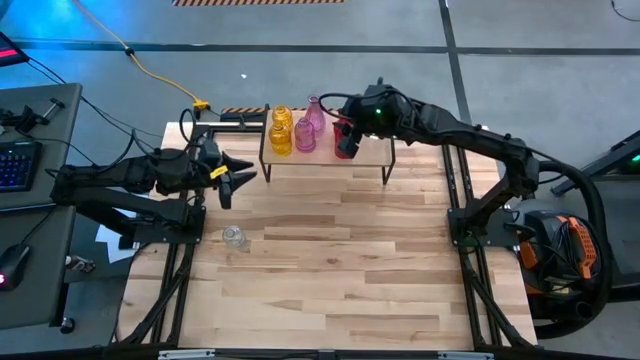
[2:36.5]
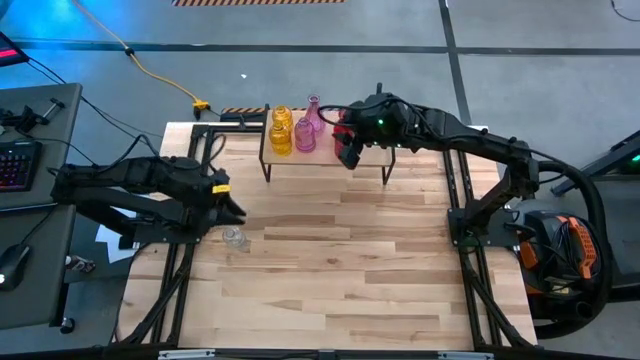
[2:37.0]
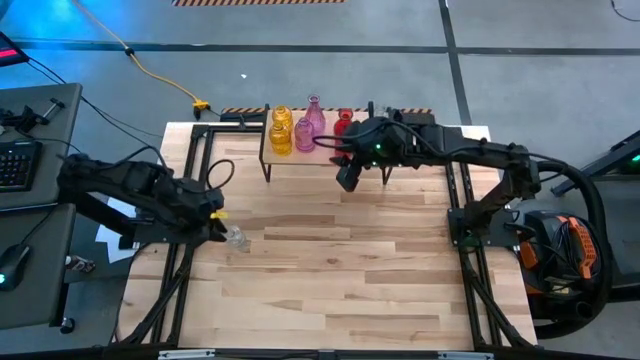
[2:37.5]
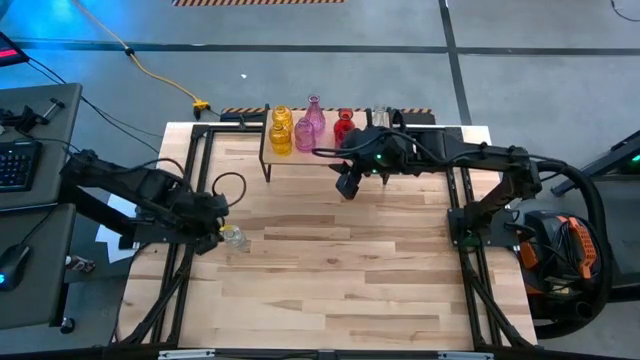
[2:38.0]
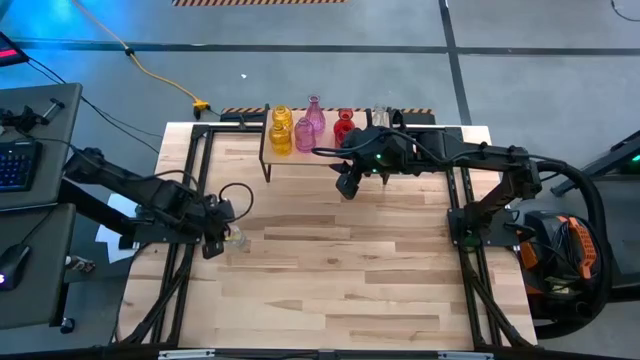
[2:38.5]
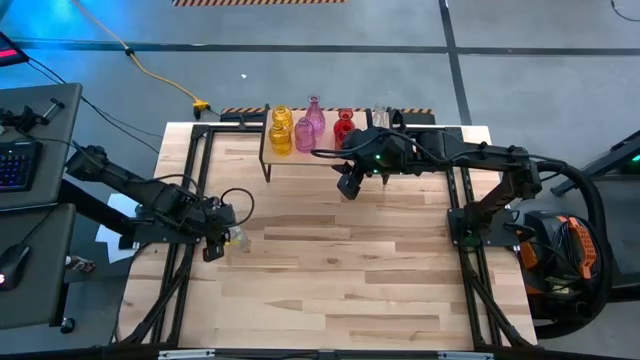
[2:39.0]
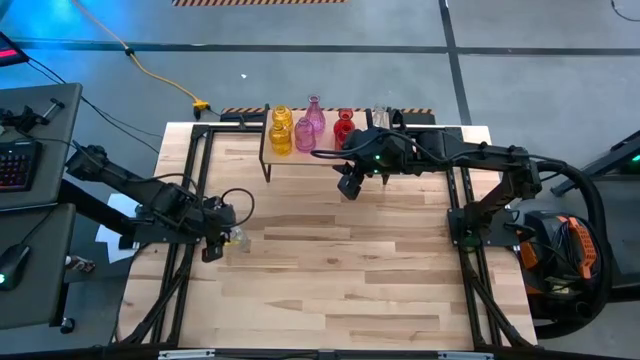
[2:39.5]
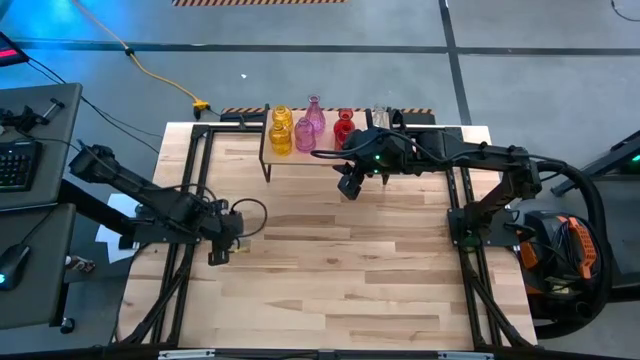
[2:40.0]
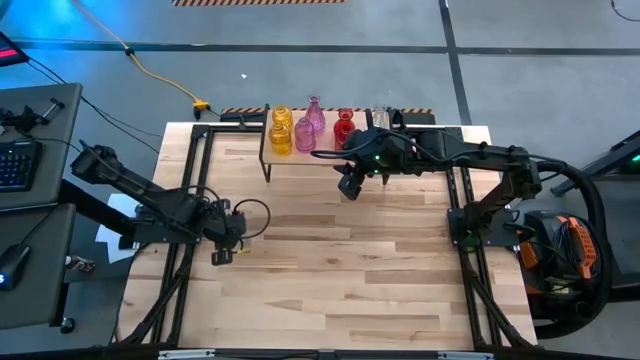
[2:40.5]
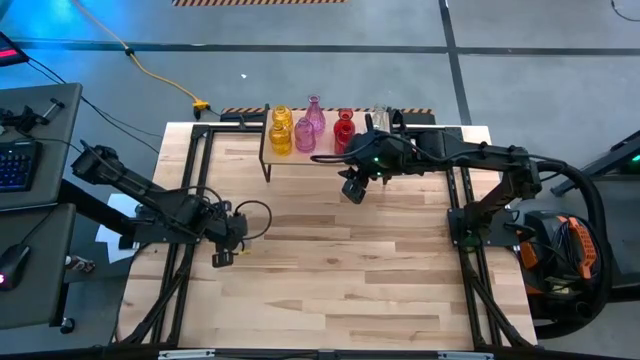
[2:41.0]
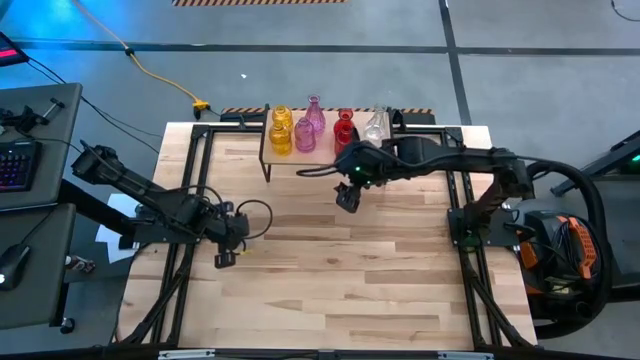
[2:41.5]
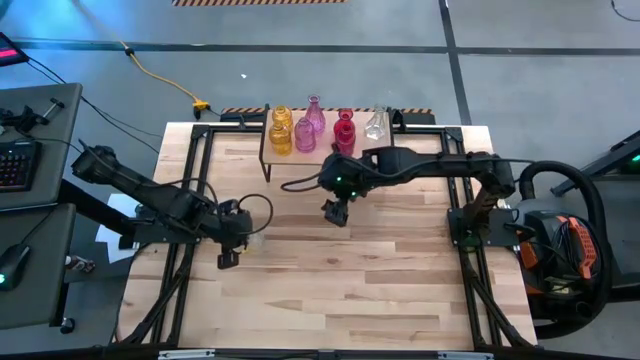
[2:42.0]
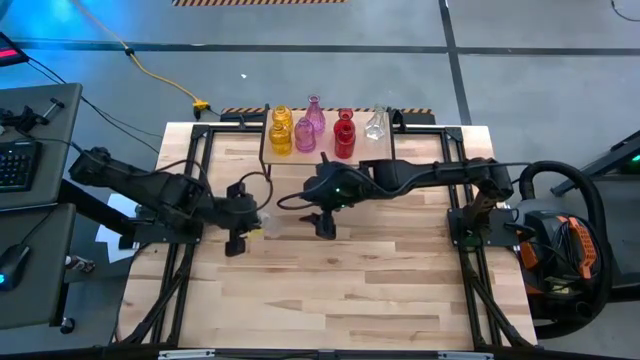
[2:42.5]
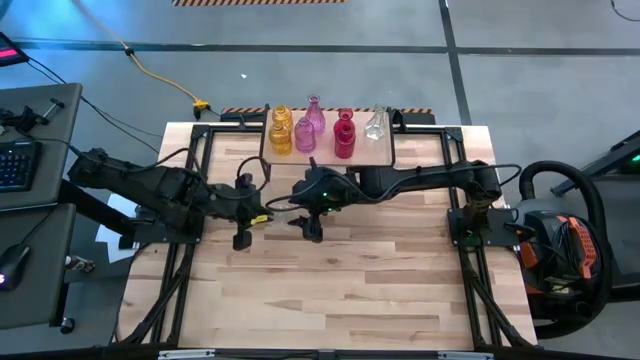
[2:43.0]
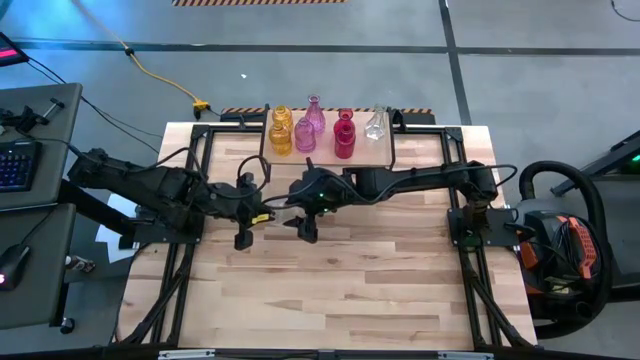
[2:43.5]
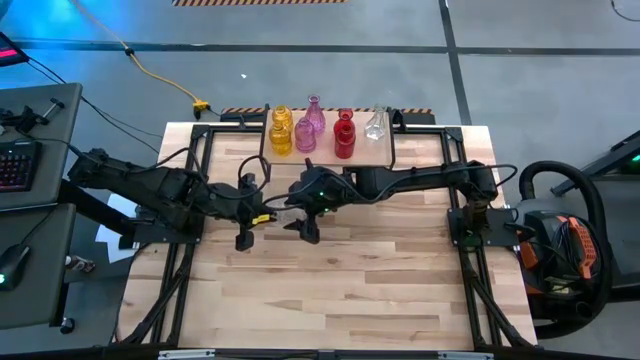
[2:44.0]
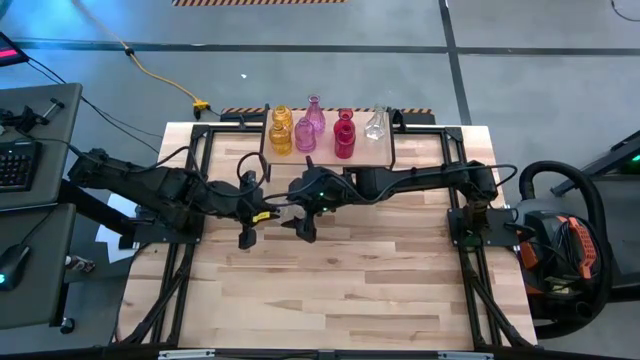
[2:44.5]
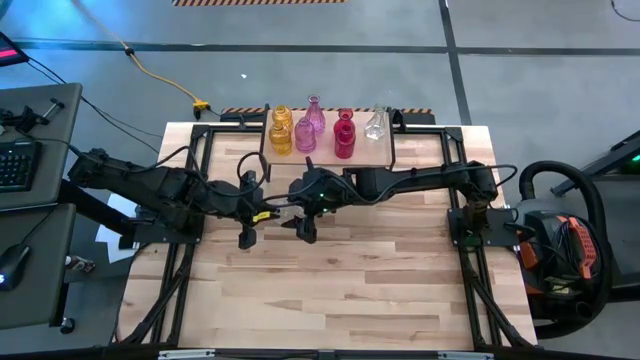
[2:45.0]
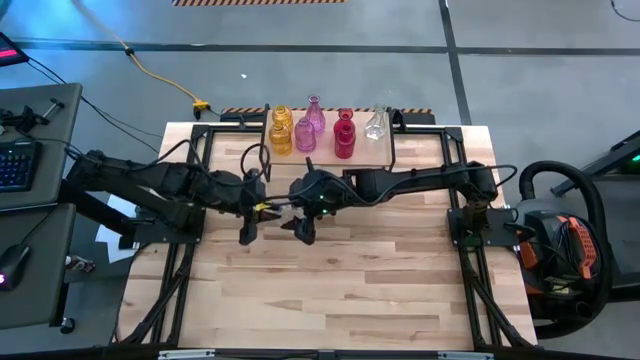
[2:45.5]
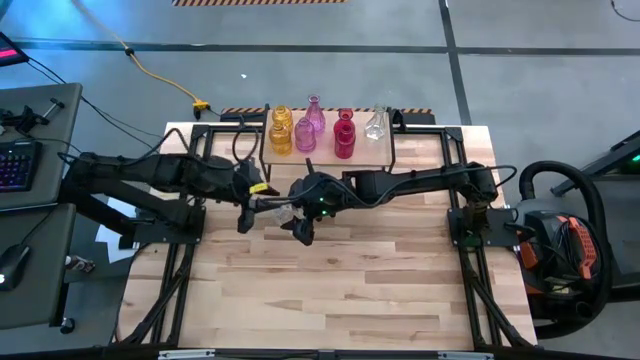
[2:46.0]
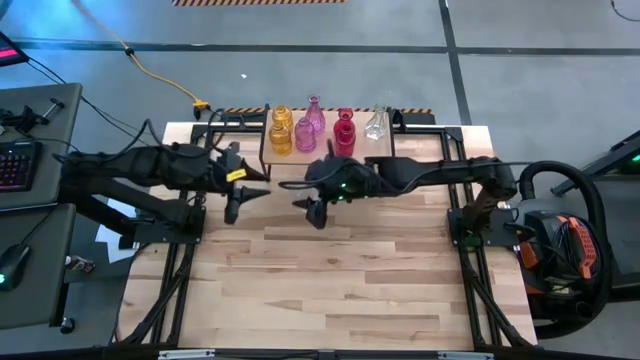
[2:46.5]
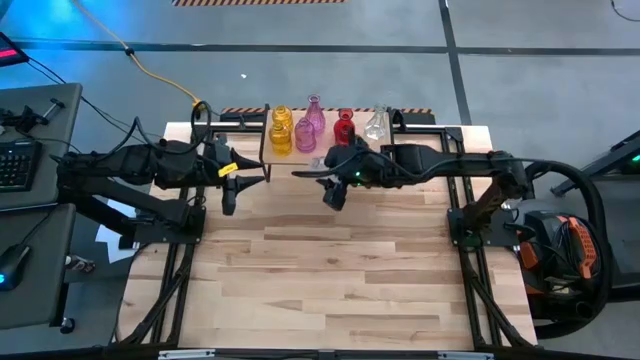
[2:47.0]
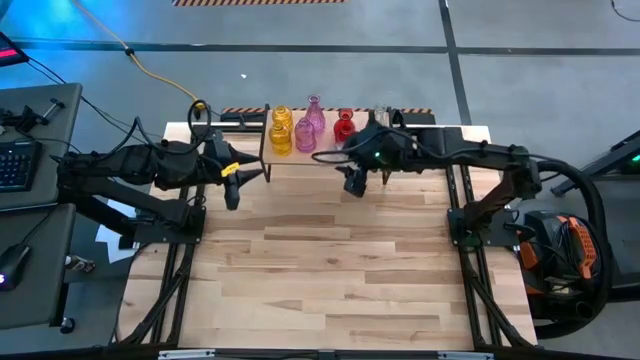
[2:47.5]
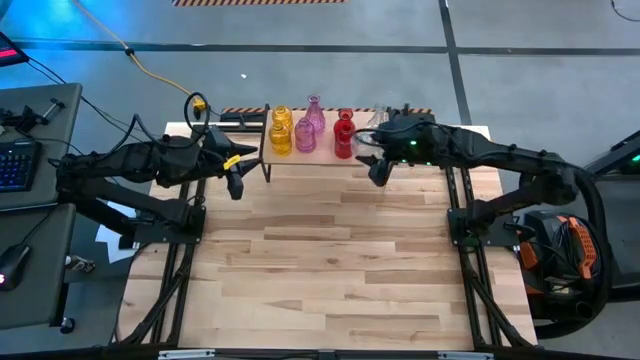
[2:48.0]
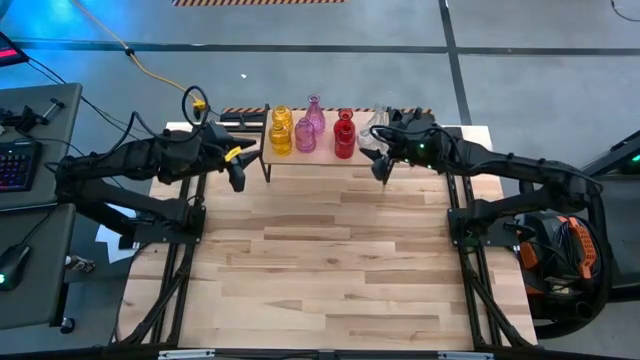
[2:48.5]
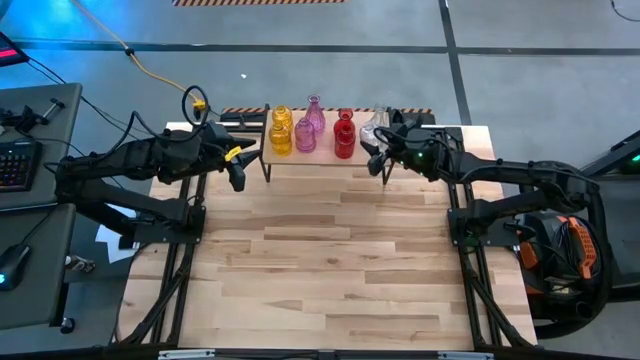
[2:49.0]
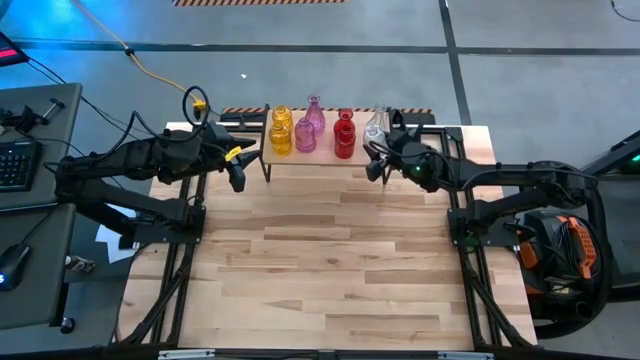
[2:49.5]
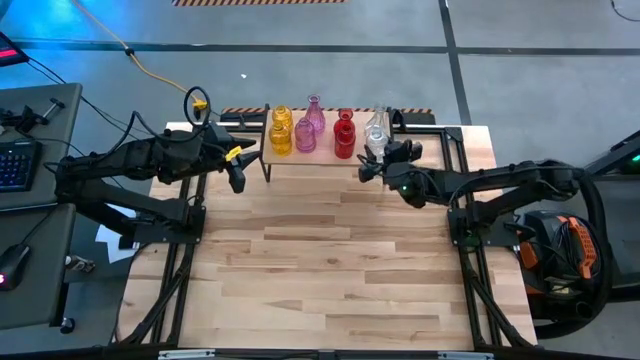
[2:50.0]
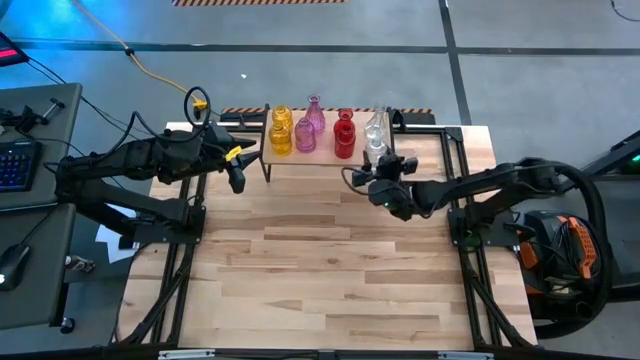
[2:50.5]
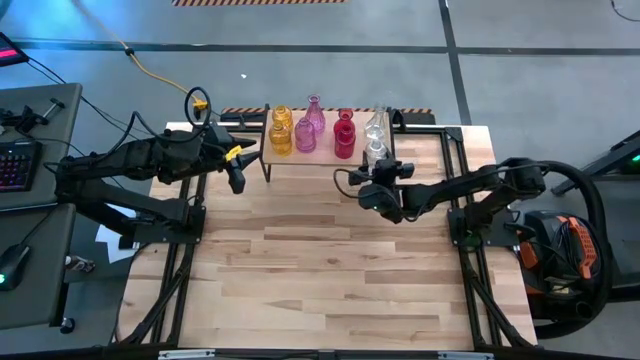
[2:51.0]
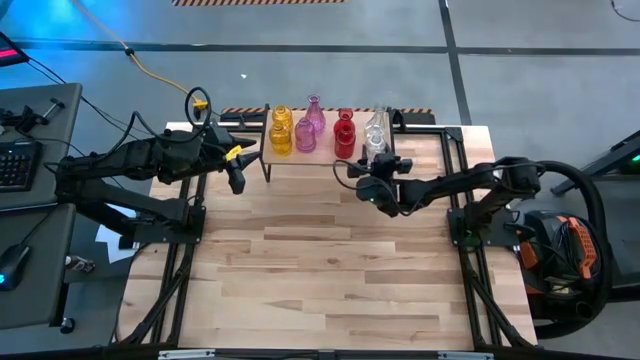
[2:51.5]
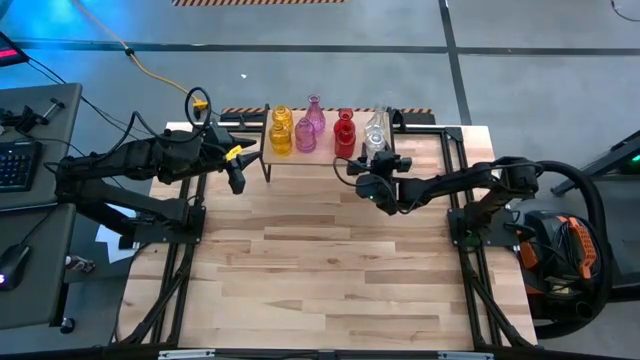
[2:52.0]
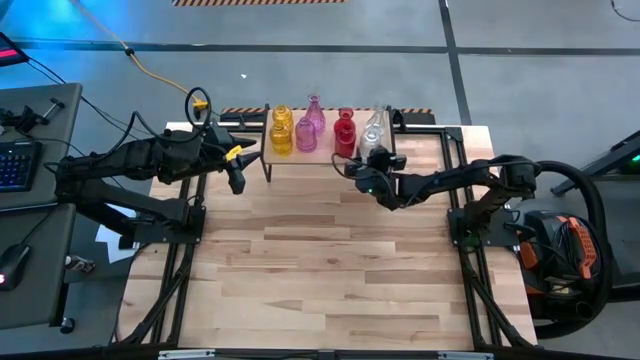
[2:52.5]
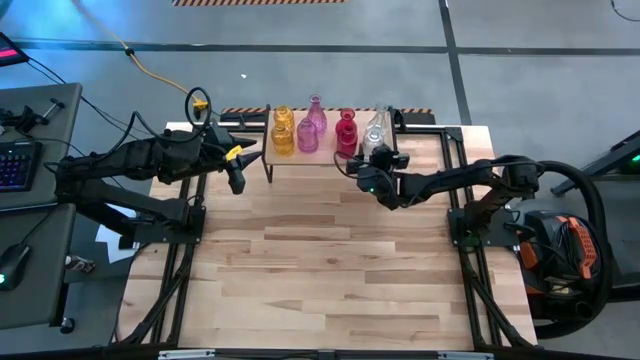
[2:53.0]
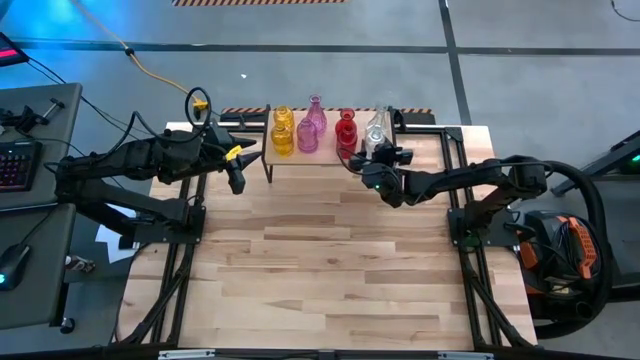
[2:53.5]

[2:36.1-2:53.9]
Task: sort vases onto shelf
Put the transparent vase on the shelf

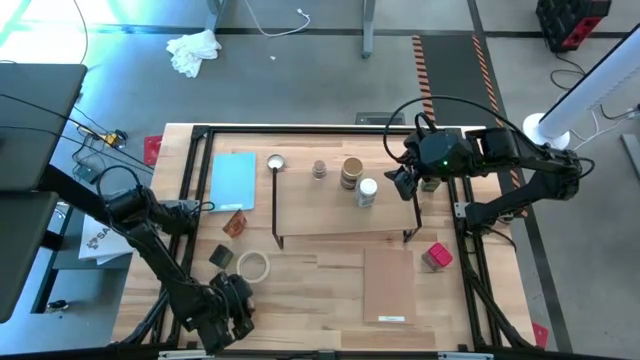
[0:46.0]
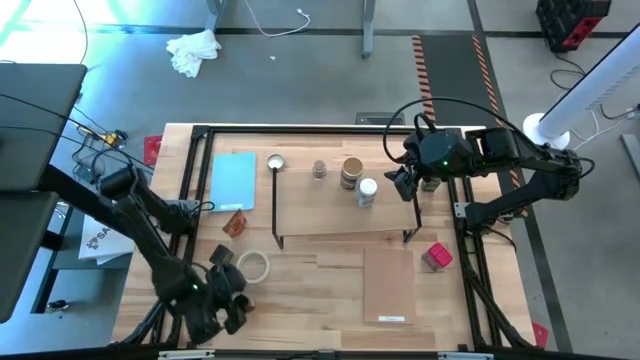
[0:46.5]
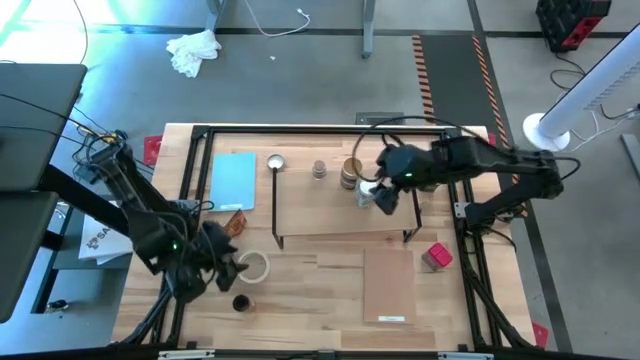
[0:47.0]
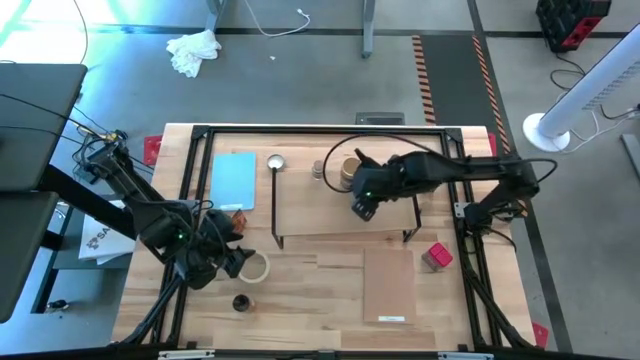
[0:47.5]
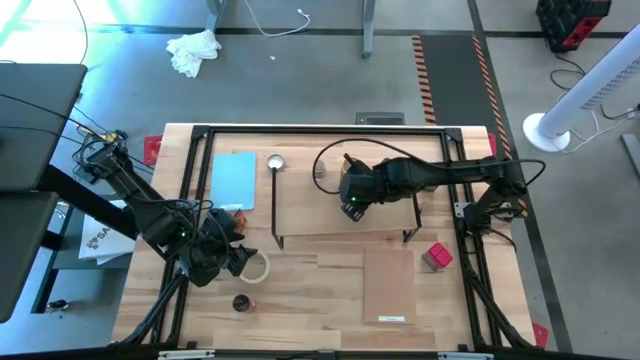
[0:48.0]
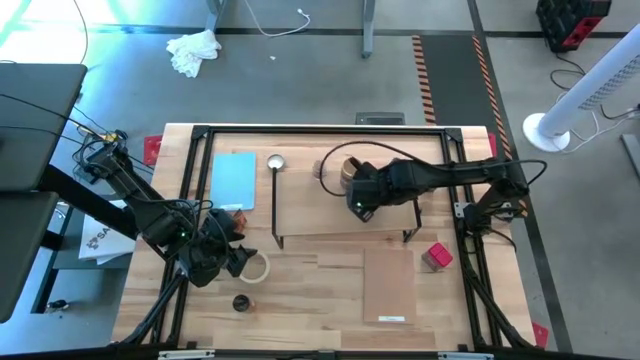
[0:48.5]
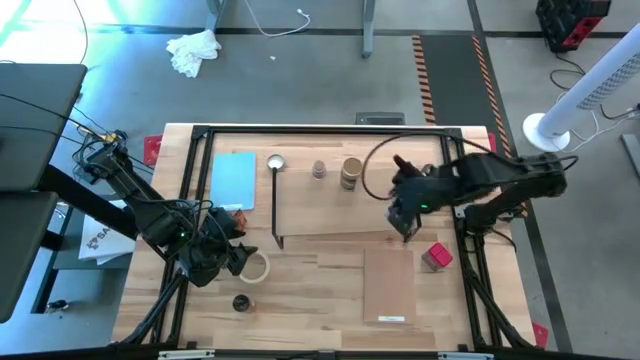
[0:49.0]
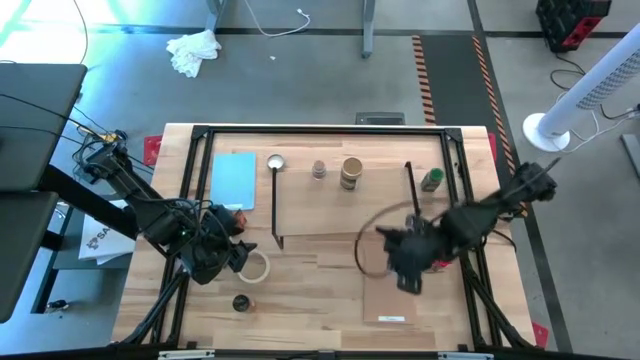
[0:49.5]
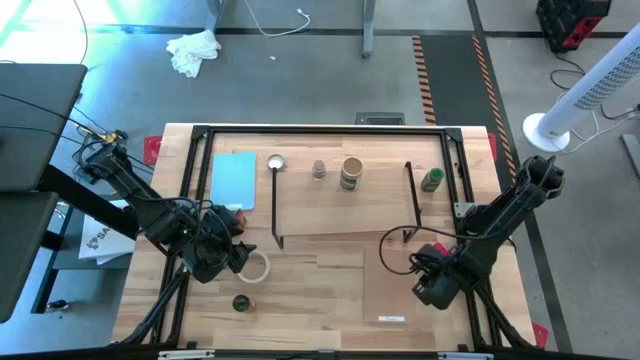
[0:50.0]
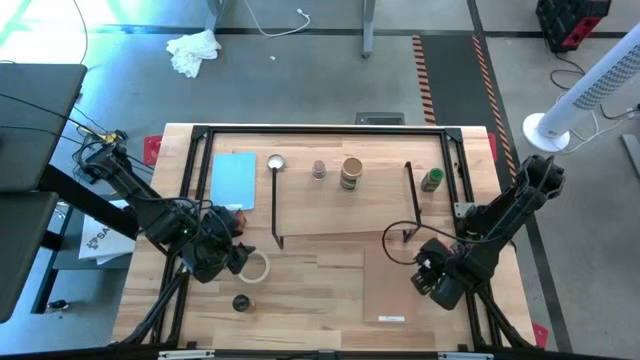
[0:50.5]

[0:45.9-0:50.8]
Task: Shelf spices
Remove the white seasoning bottle from the shelf
